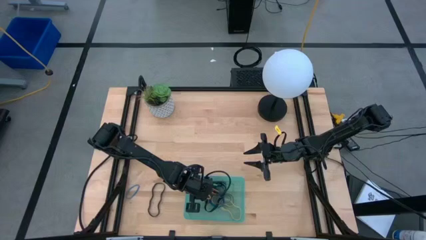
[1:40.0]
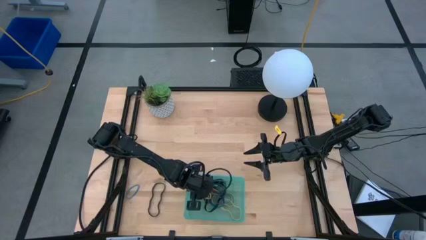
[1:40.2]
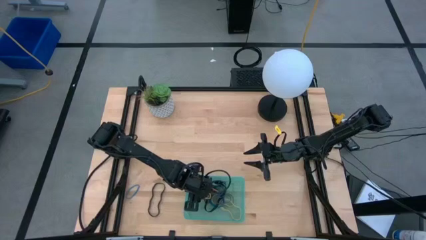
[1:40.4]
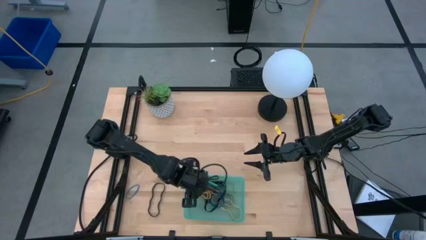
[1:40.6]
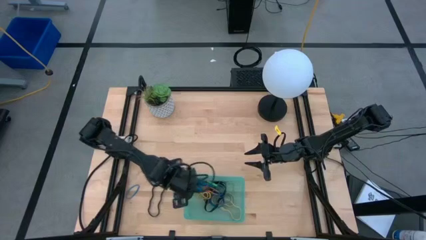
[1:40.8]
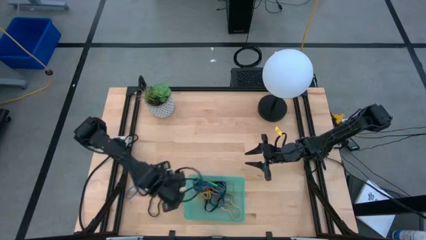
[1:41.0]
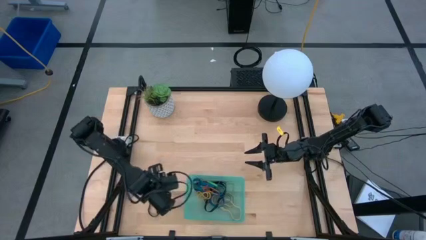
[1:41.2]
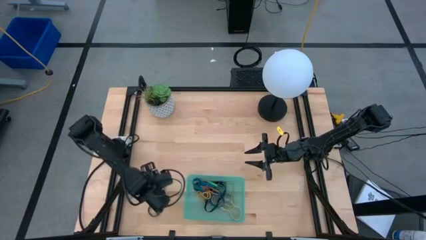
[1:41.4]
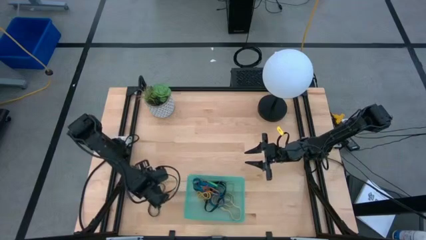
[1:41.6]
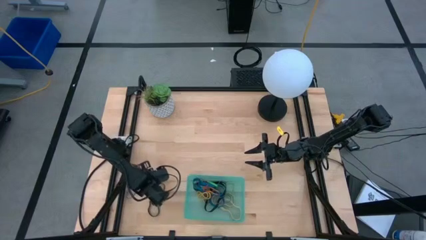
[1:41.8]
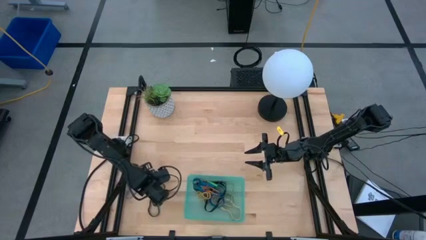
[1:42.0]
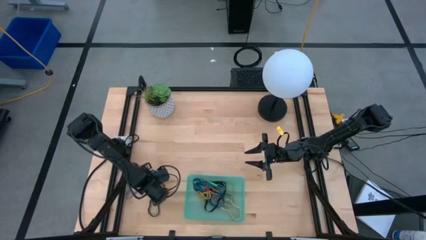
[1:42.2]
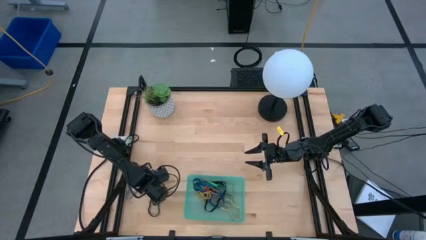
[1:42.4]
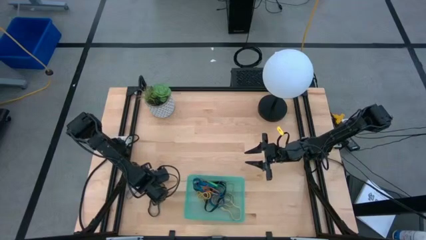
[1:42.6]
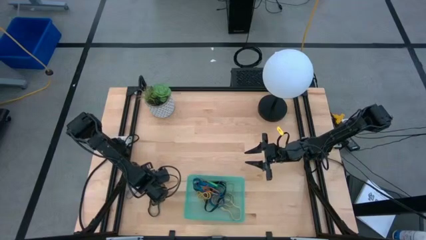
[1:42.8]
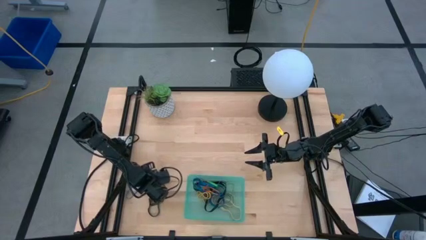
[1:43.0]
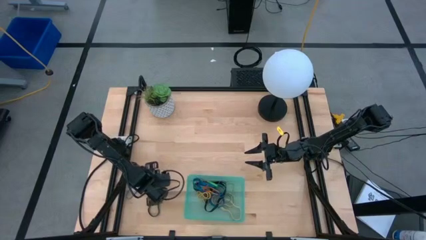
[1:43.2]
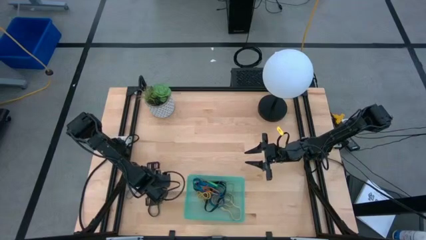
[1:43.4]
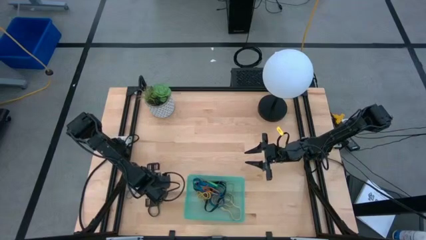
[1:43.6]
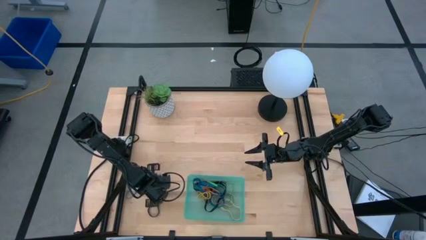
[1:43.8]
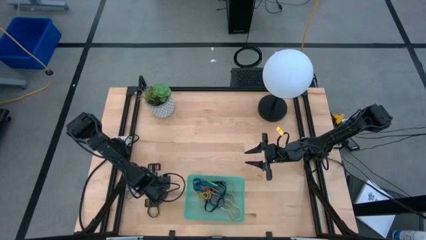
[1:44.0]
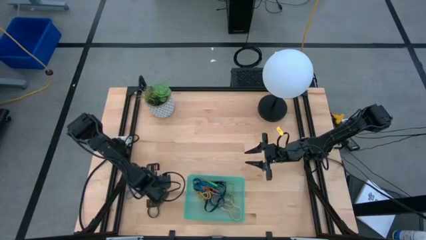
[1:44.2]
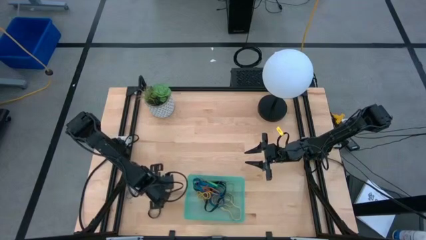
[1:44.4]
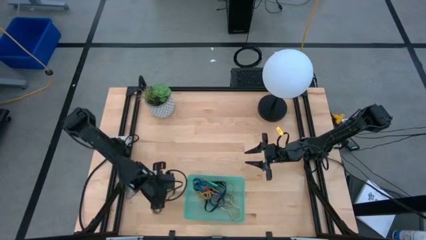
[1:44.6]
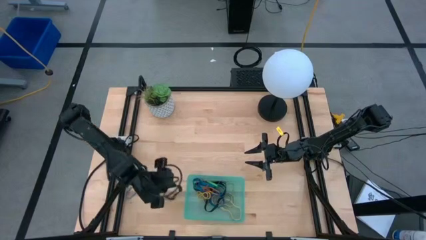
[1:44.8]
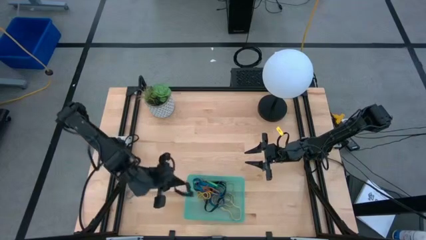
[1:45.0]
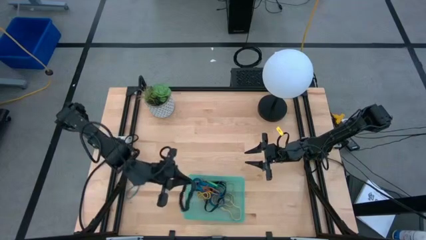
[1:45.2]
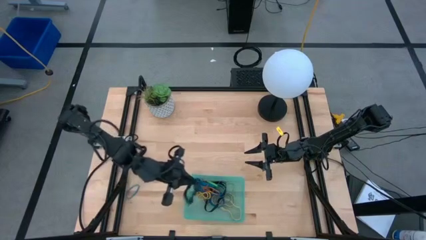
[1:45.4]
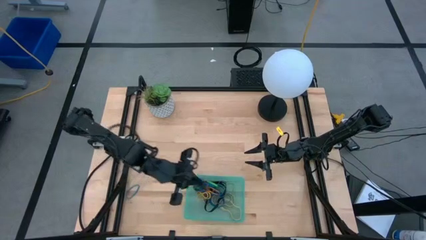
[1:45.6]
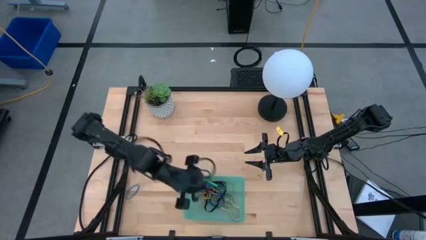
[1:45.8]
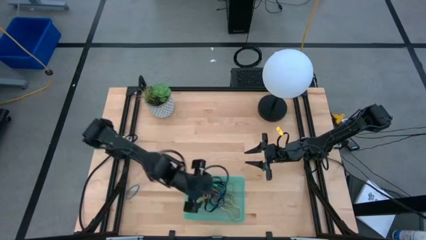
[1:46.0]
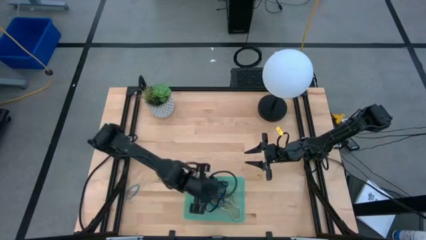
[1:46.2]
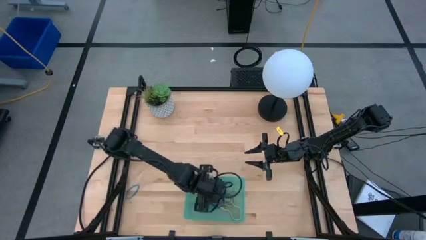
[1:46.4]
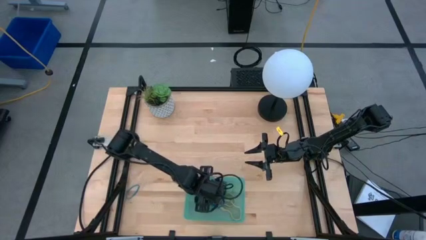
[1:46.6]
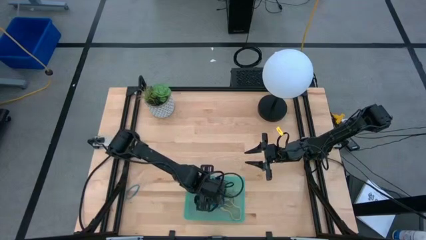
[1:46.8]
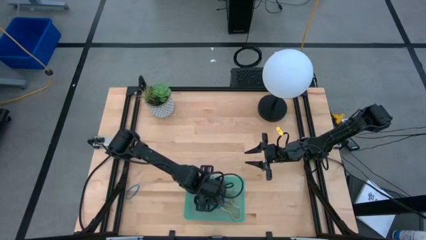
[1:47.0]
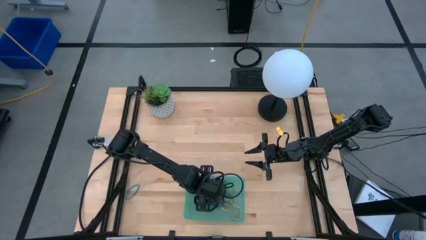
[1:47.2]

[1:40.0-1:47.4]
Task: Pick and place rubber bands into bin
Put the large black rubberband into the green bin

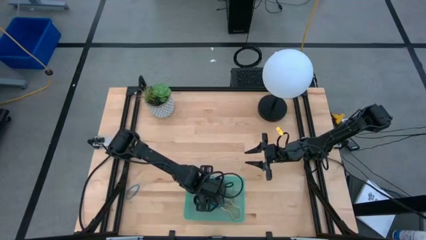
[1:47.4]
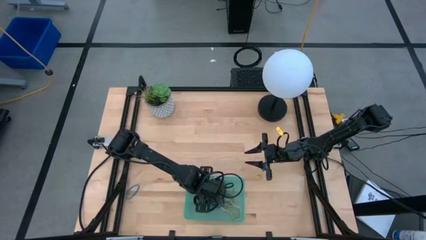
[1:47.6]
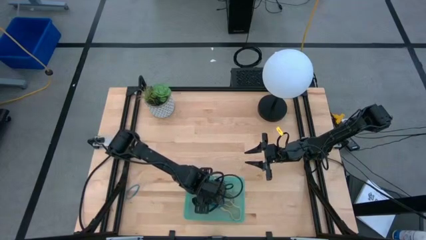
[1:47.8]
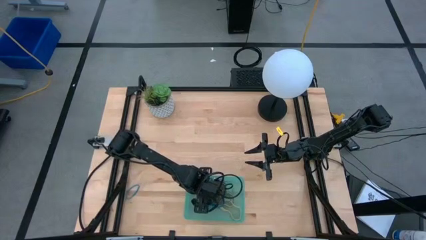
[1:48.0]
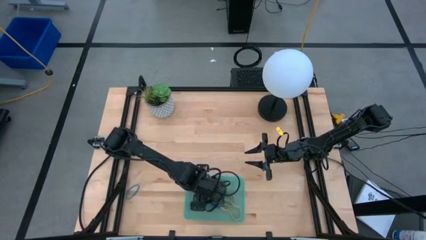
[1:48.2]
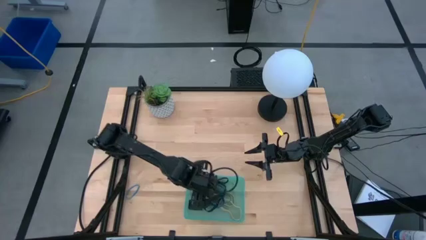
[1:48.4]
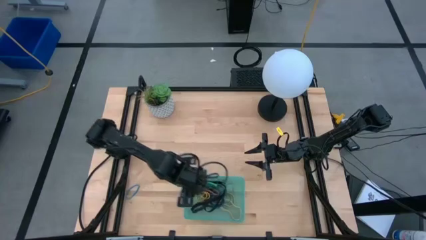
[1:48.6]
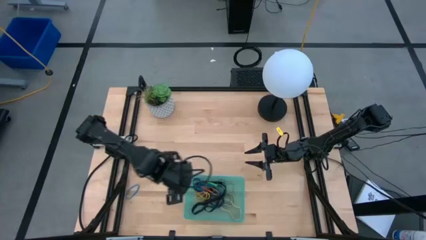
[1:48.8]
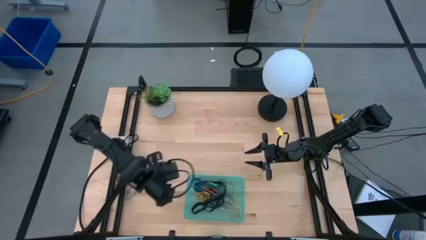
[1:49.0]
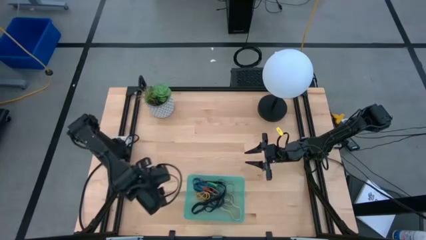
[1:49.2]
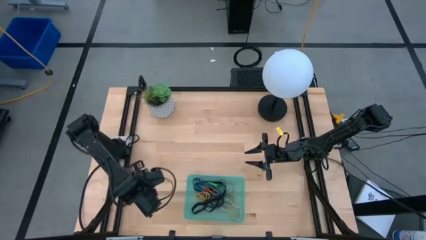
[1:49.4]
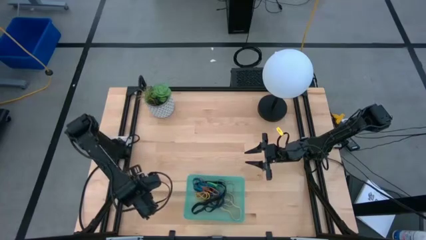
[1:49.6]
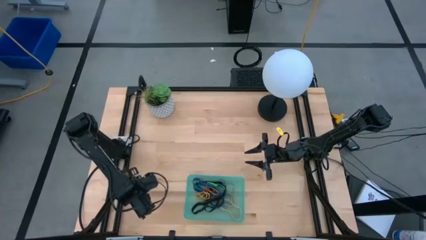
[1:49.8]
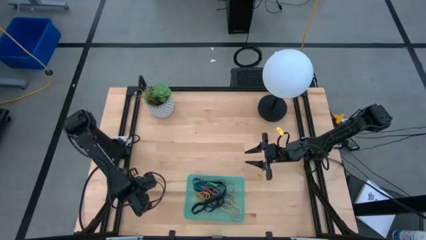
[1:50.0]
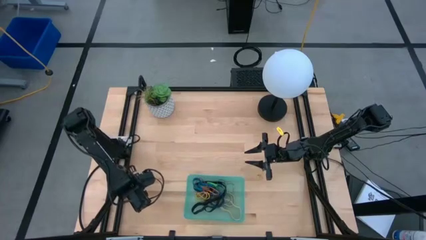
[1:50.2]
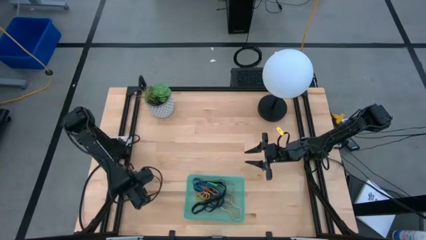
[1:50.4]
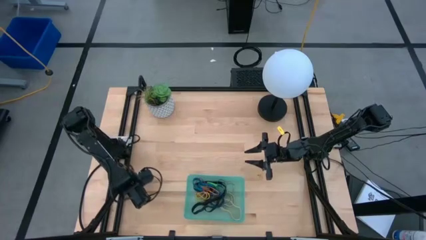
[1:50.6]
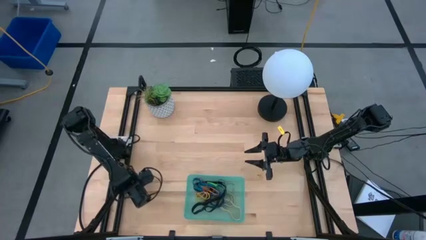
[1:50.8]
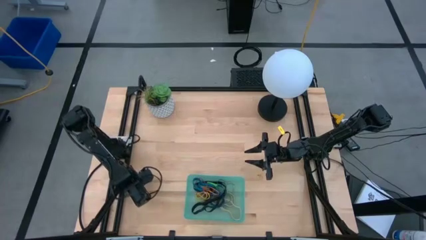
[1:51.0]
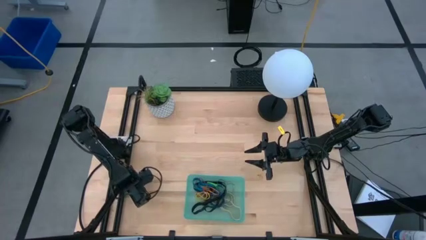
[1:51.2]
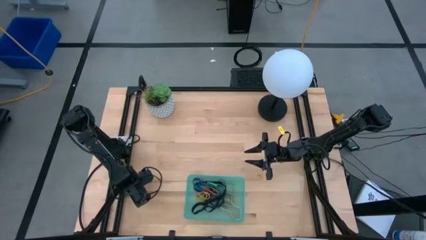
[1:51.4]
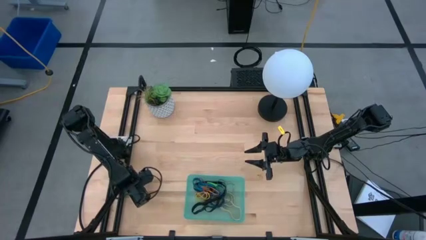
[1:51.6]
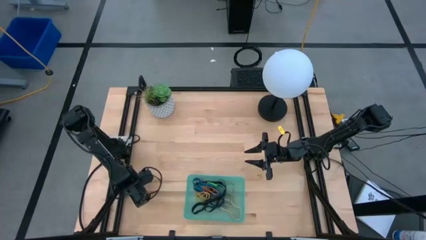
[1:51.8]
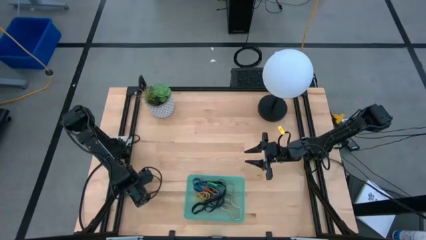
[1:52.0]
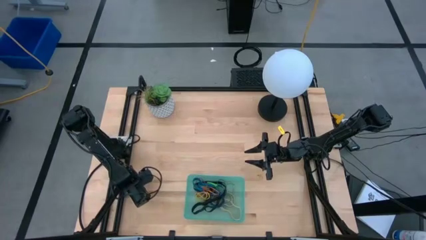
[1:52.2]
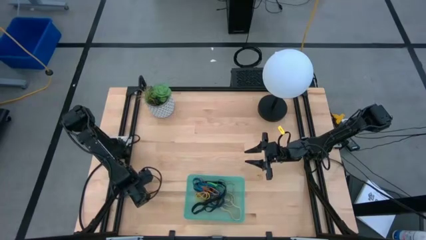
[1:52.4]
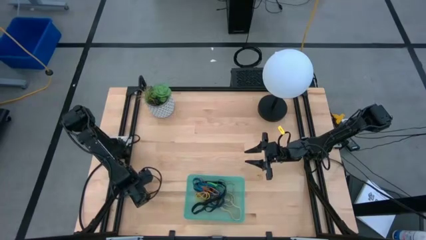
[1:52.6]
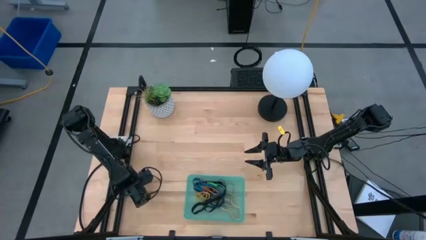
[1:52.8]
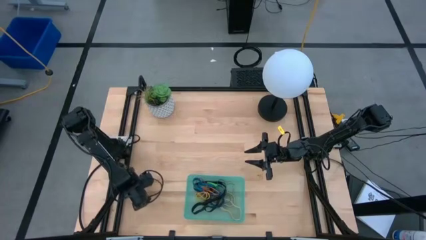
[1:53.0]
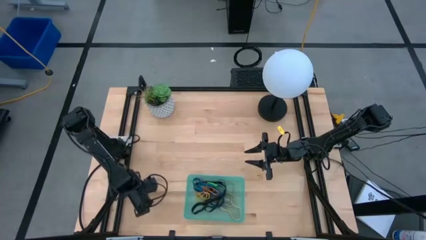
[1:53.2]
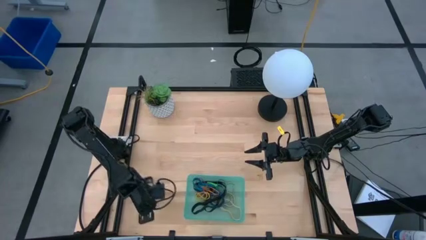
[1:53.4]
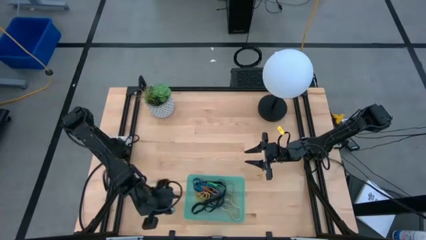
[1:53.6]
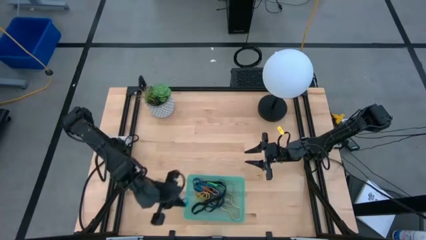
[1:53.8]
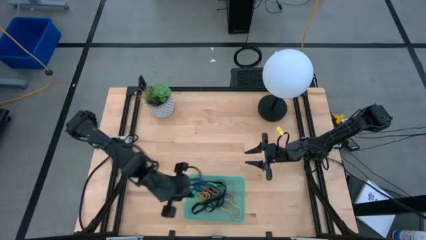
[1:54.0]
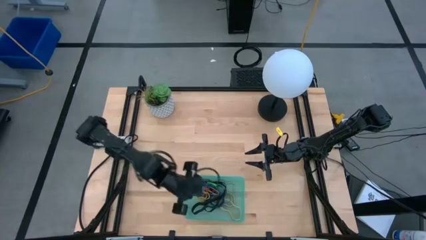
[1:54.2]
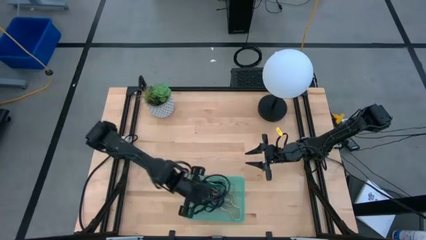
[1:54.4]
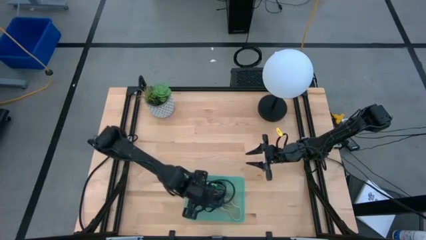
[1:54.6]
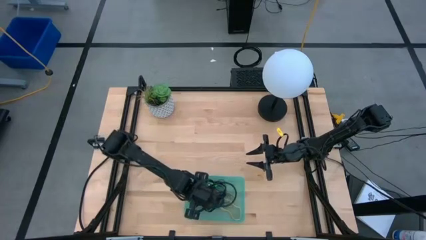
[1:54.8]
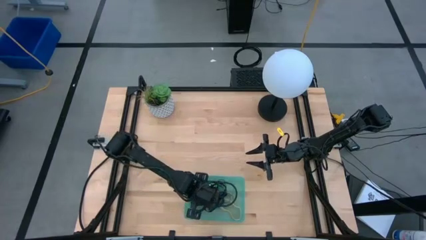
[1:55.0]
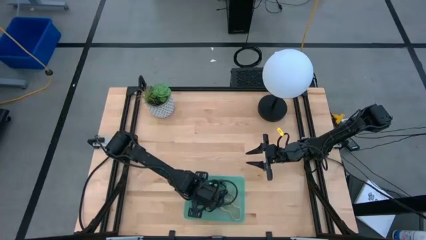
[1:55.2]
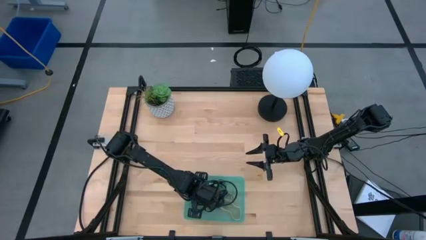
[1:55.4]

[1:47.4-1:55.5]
Put the small blue rubberband into the green bin

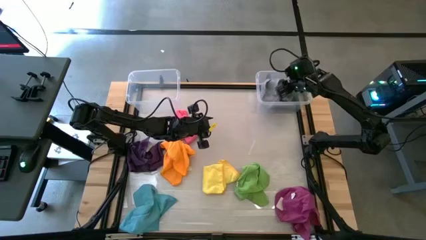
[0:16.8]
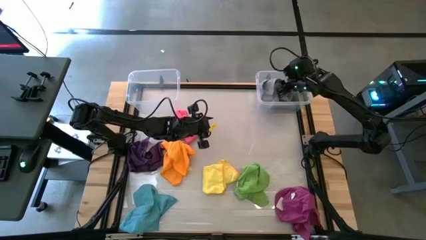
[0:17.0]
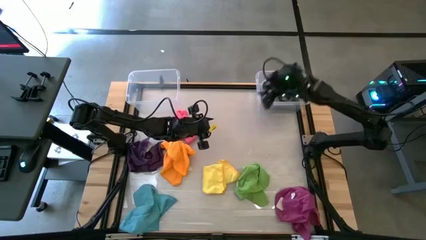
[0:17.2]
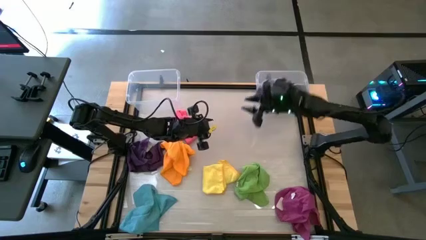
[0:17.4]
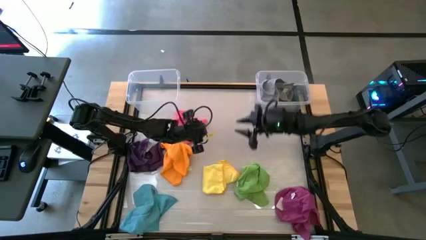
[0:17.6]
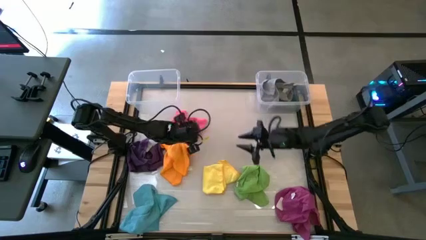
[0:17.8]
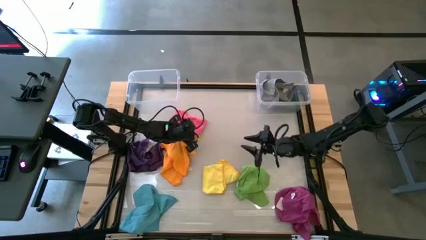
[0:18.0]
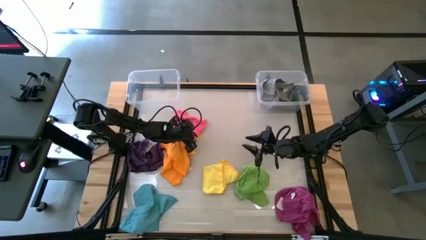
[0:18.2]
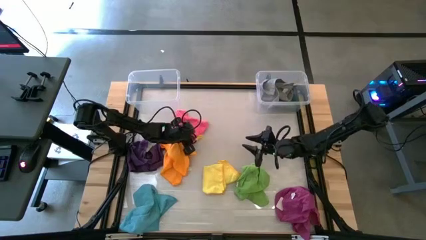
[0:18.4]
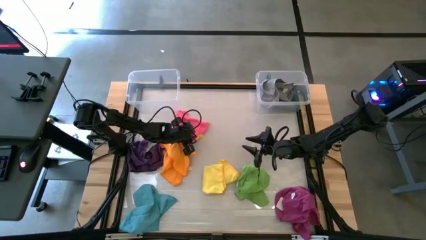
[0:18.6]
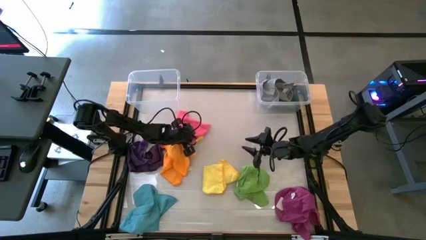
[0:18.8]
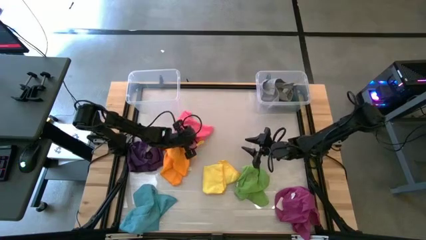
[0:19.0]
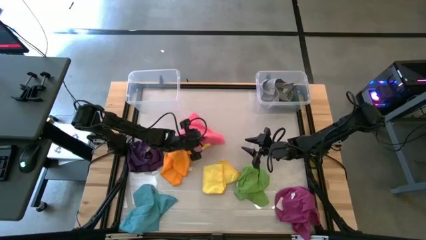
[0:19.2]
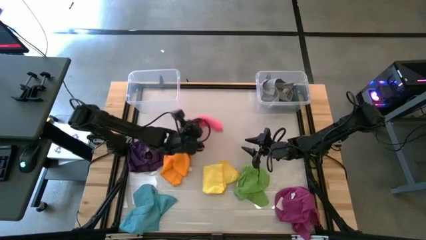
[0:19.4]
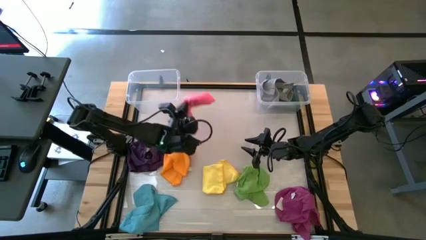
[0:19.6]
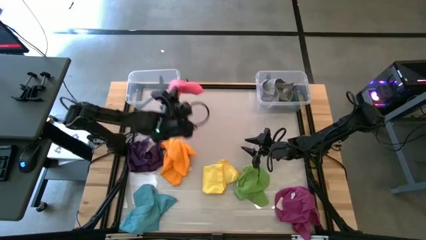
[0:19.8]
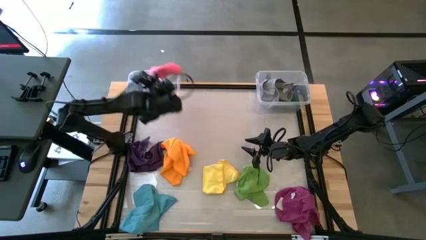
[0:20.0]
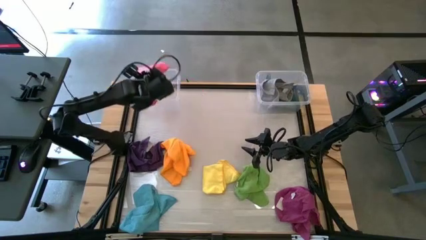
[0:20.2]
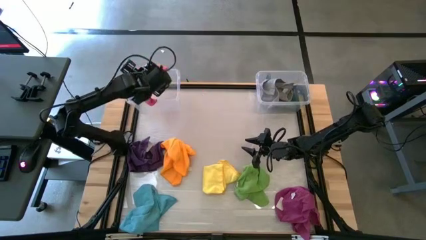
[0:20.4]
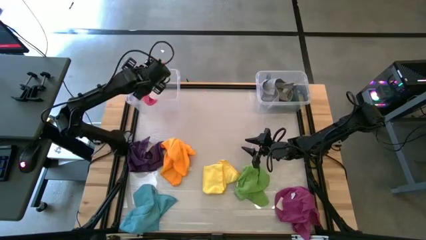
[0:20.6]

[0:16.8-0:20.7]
Task: Sort towels by color in basket
Put the pink microfiber towel into the left transparent bin
